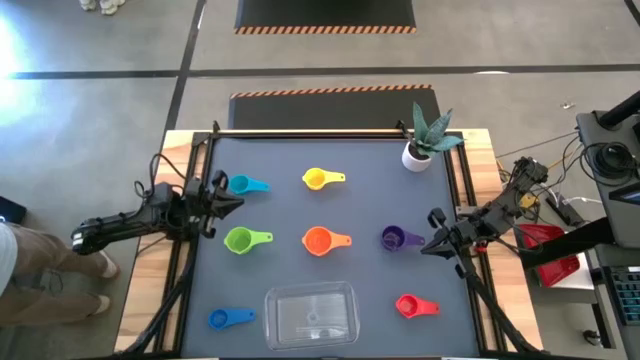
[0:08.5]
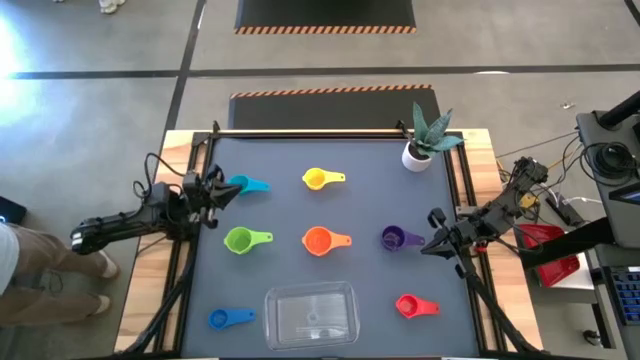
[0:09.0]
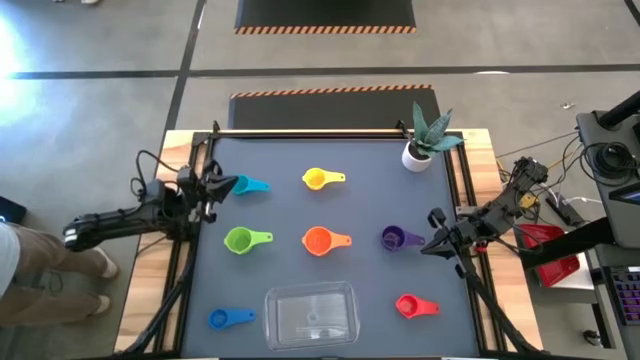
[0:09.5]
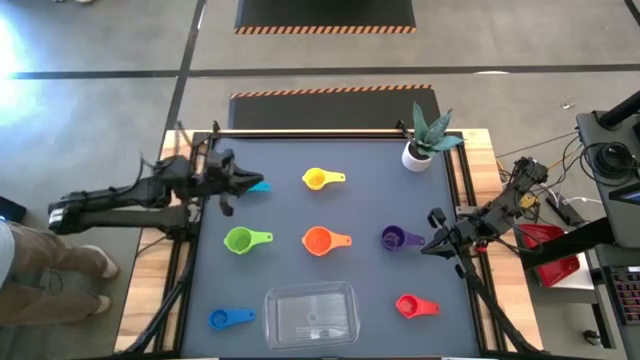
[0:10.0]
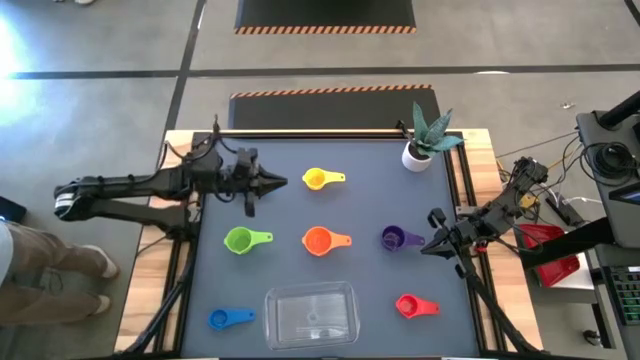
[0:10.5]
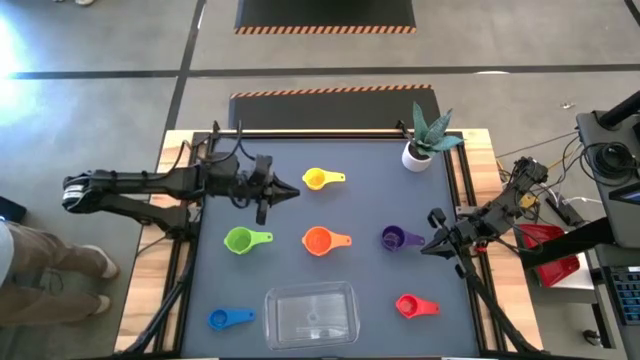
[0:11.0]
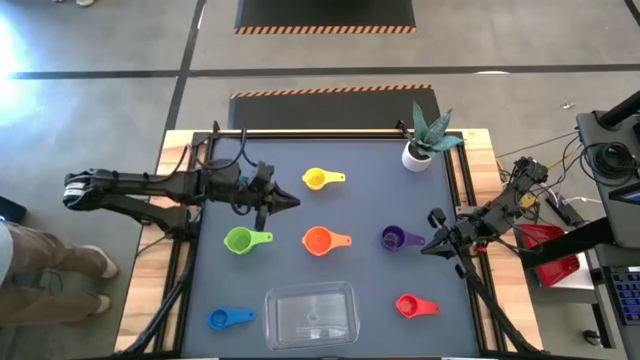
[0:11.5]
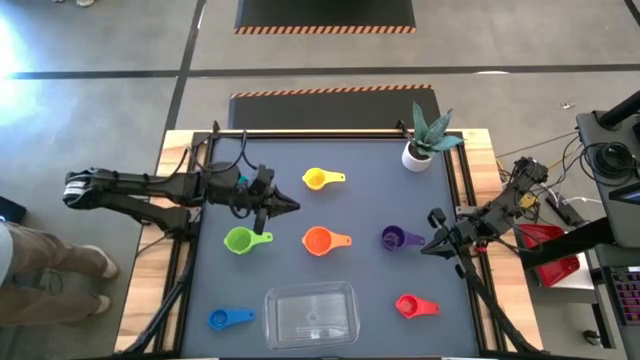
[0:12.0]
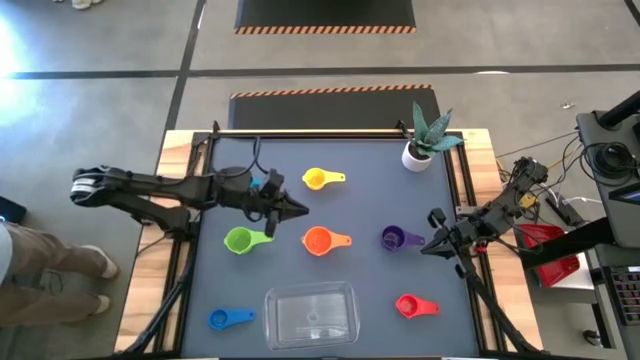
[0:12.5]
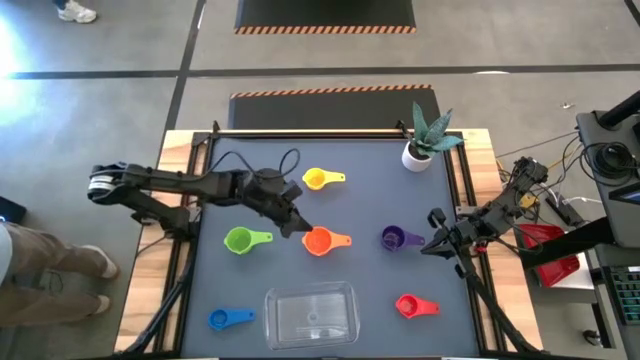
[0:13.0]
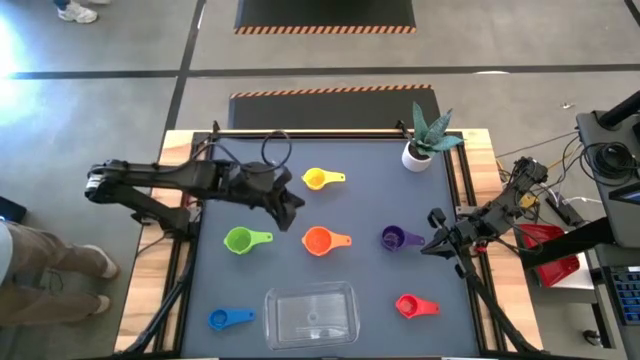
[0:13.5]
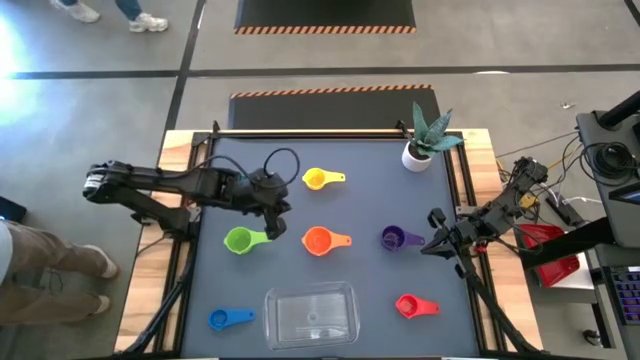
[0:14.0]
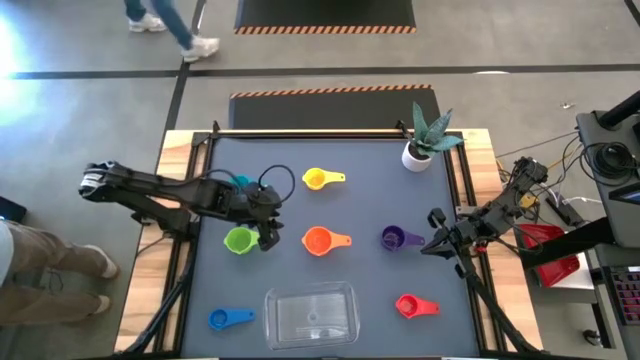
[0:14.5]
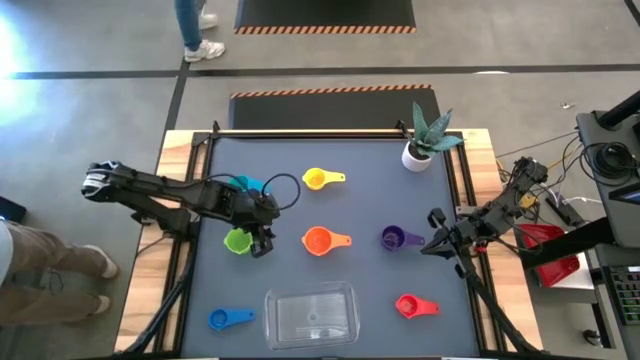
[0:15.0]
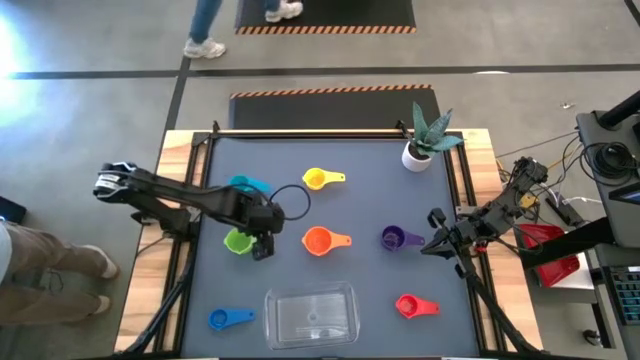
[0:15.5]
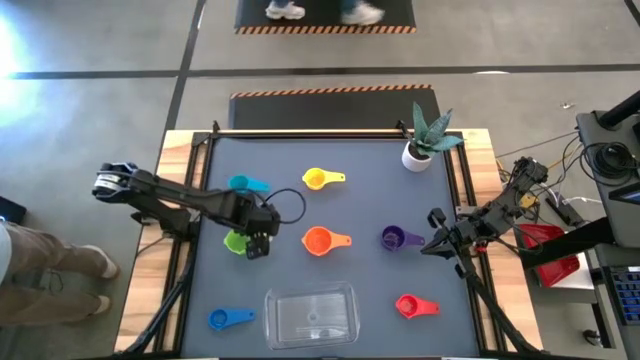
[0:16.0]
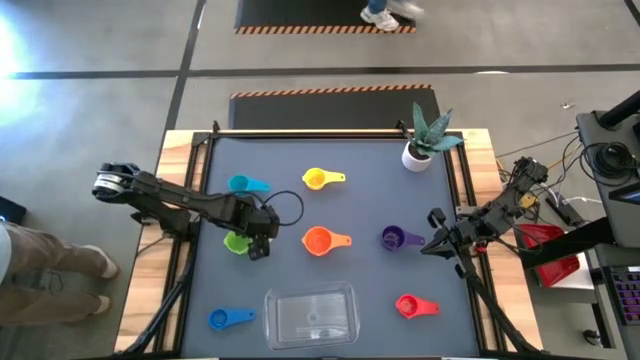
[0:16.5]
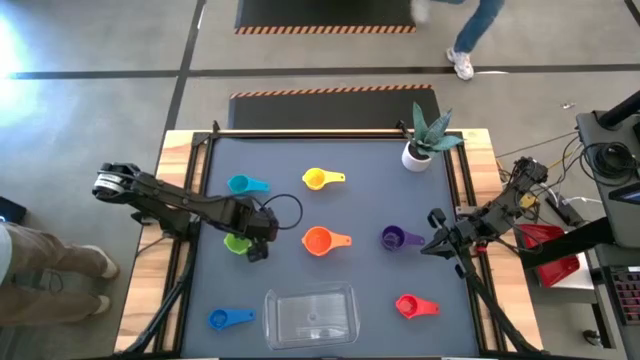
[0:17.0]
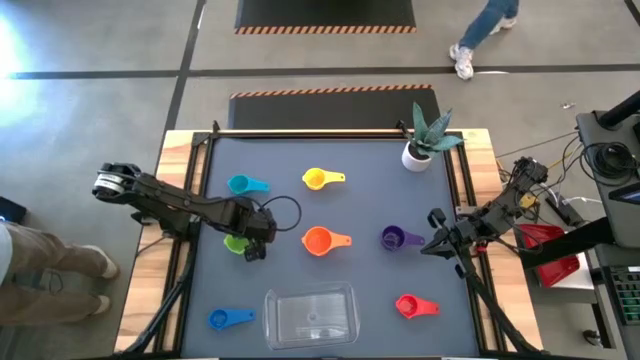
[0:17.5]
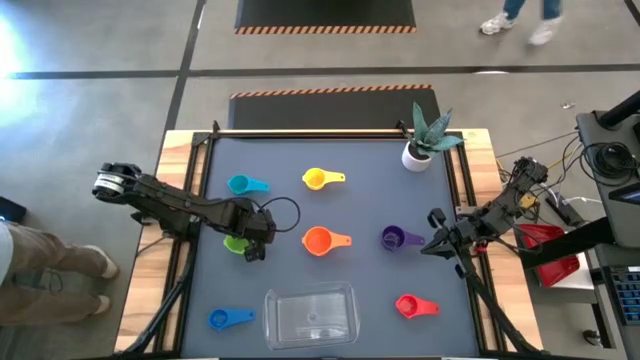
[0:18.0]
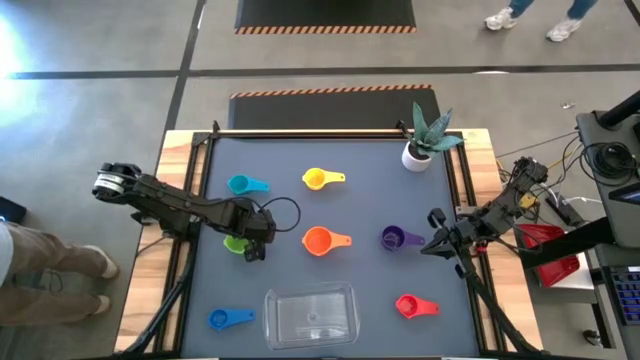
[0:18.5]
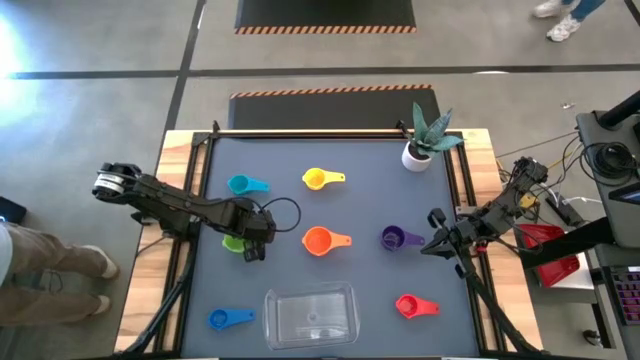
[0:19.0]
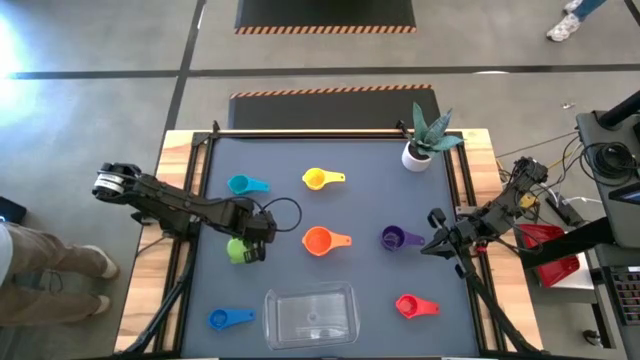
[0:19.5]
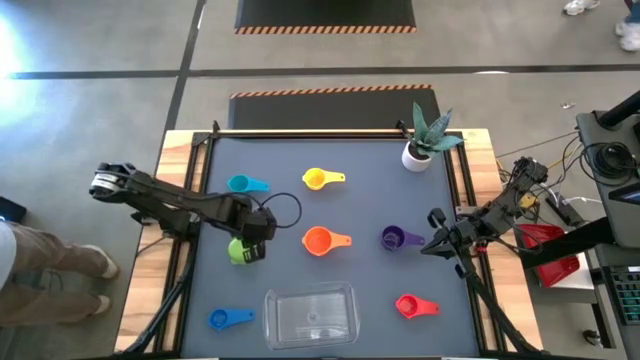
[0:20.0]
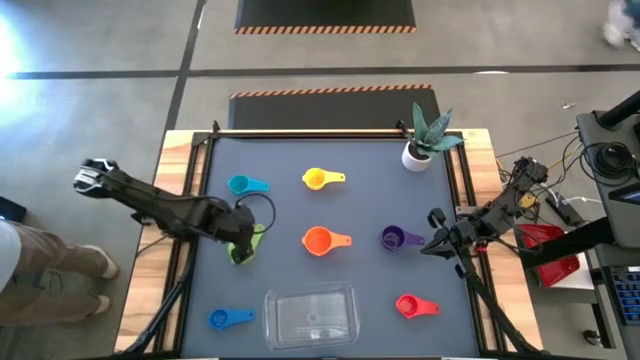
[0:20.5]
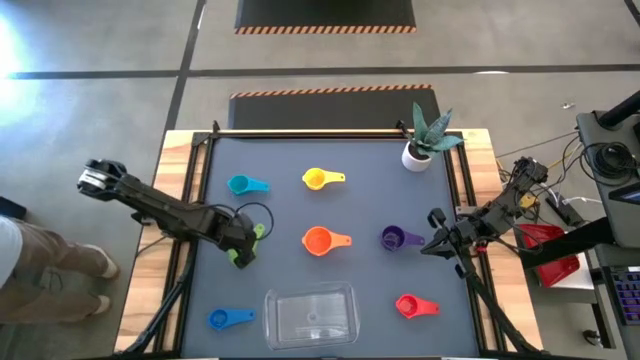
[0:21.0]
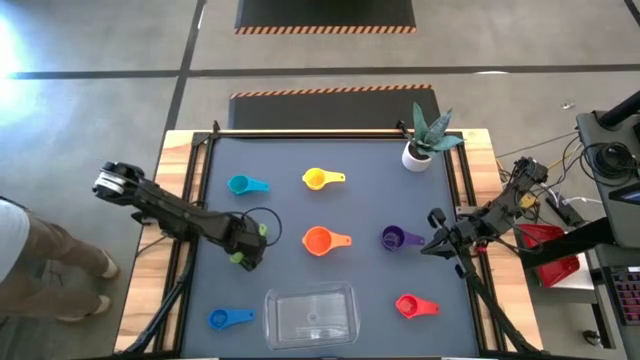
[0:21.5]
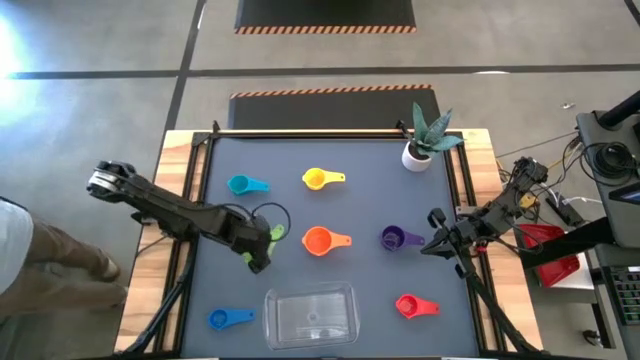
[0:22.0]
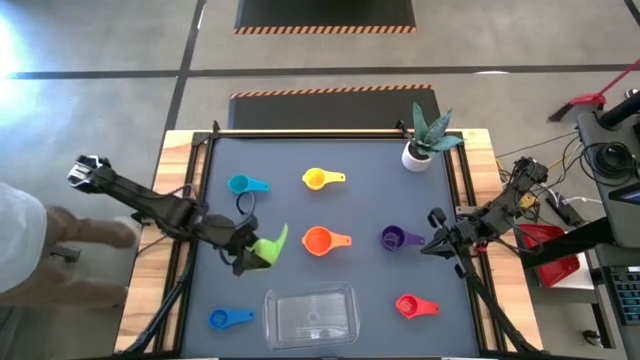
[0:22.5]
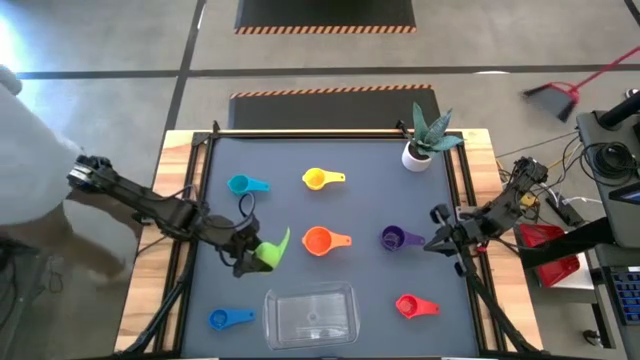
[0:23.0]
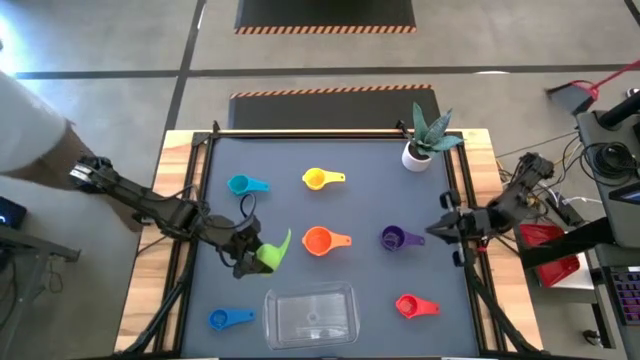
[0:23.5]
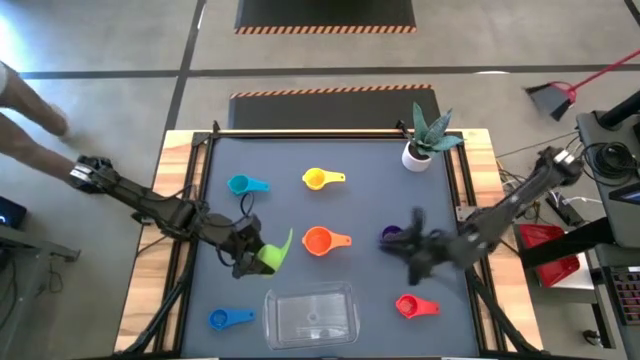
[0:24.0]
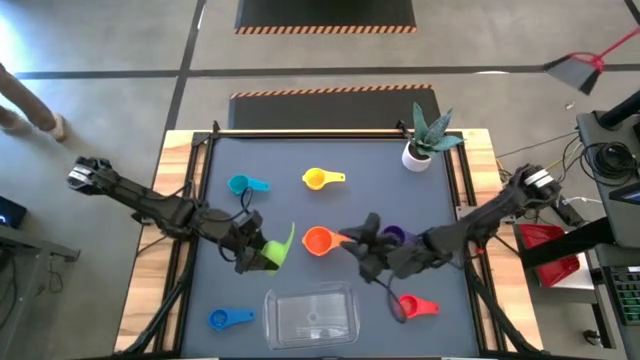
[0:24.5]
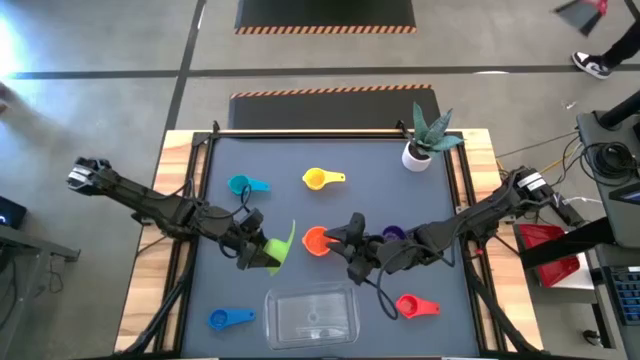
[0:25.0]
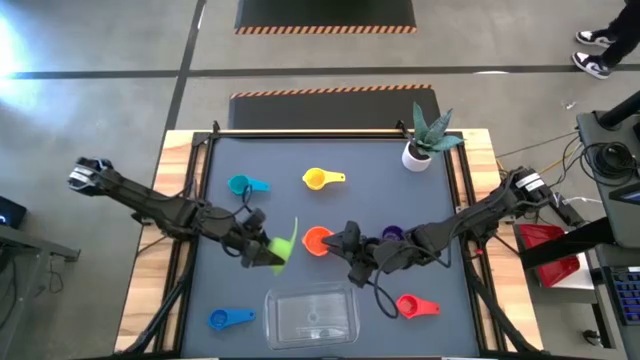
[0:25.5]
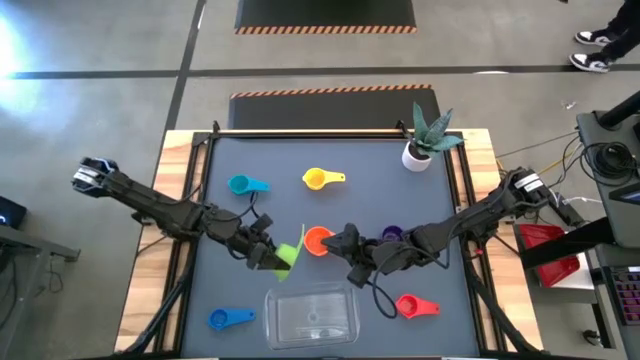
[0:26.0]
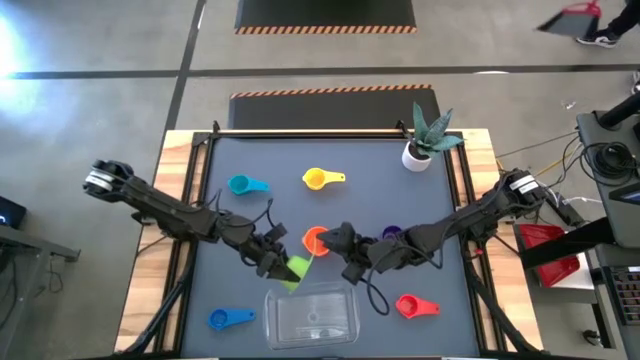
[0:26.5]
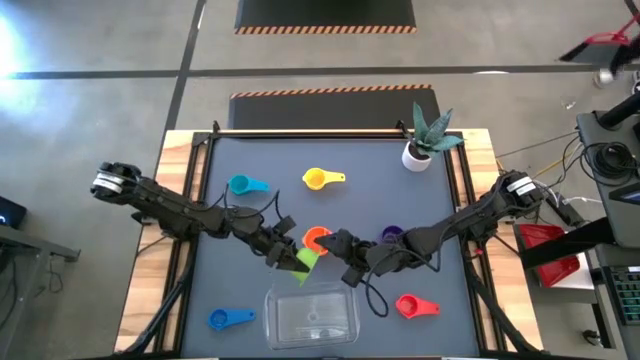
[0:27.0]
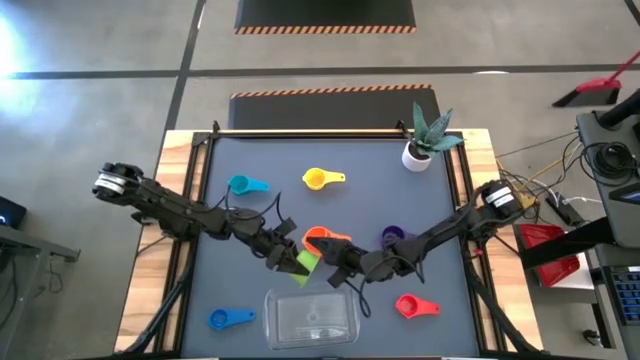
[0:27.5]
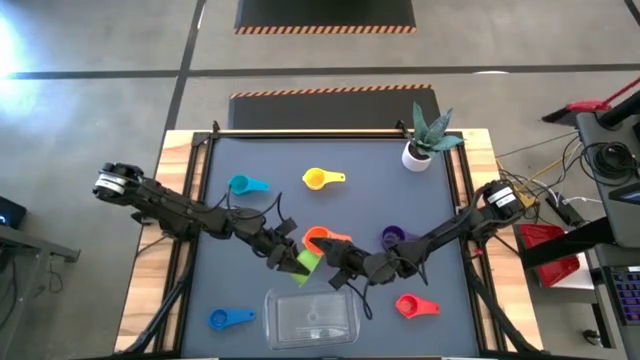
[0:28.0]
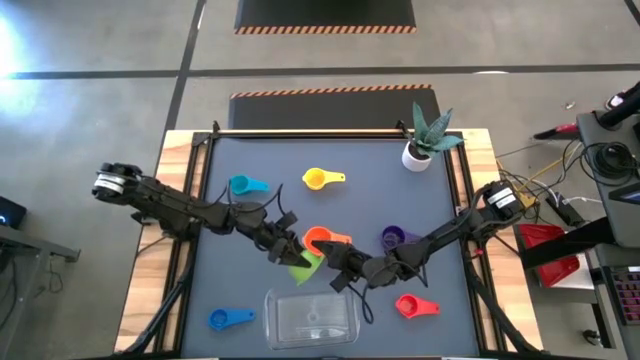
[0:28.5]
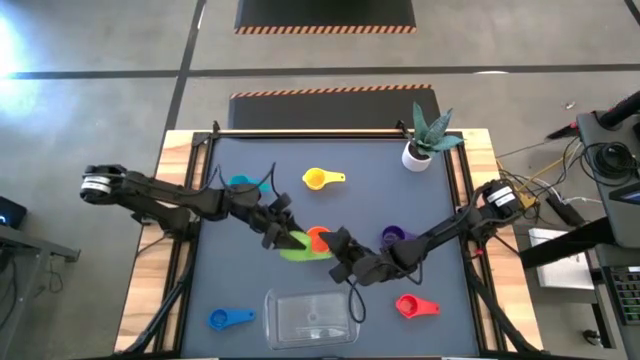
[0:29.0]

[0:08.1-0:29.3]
Task: Nest measuring cups in basket
Stack the green measuring cup on top of the orange measuring cup
